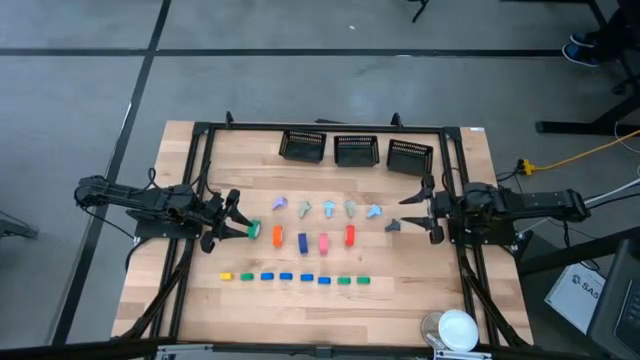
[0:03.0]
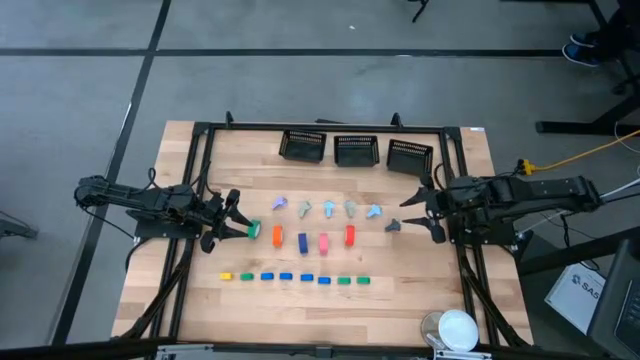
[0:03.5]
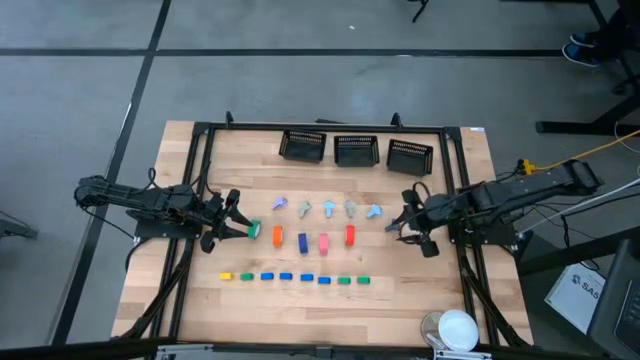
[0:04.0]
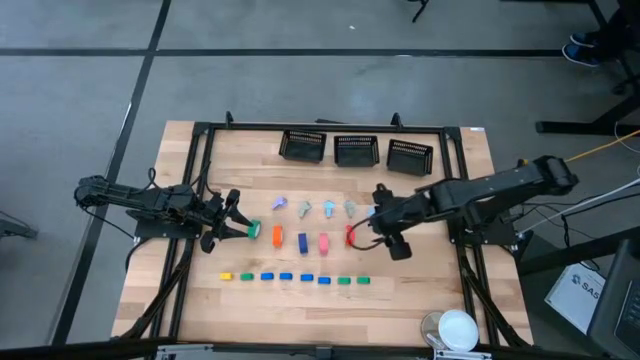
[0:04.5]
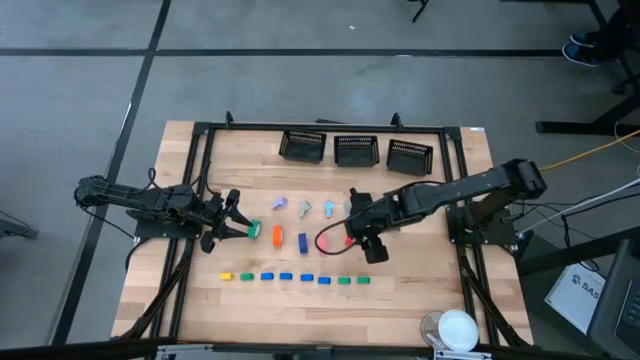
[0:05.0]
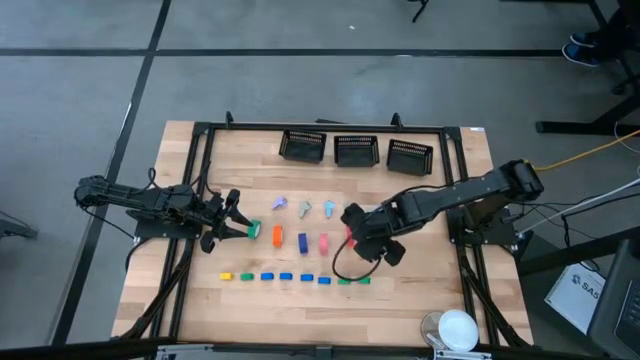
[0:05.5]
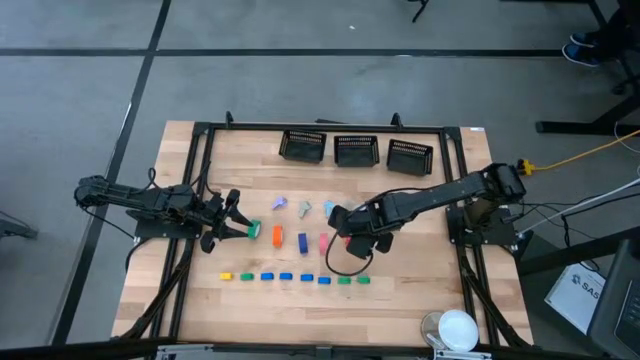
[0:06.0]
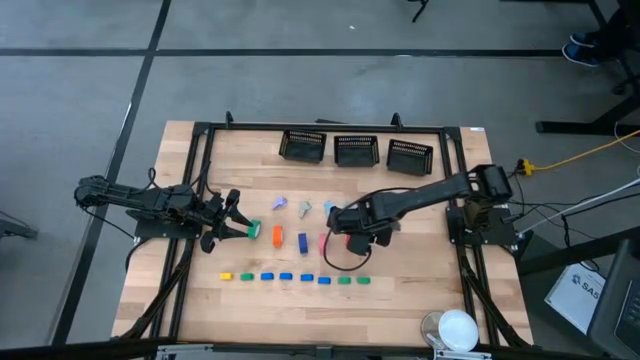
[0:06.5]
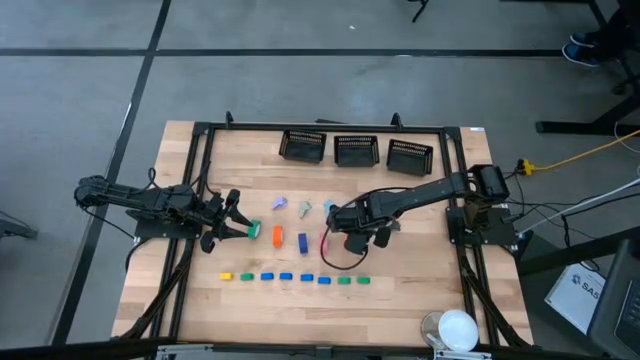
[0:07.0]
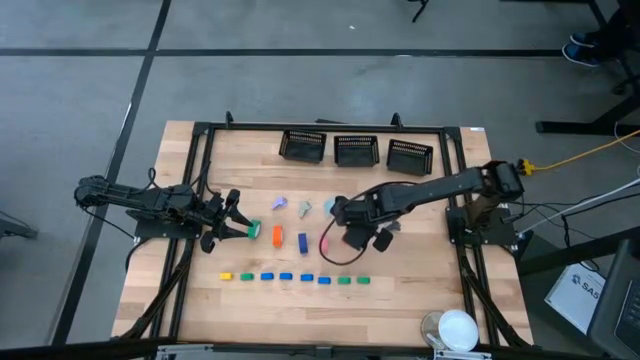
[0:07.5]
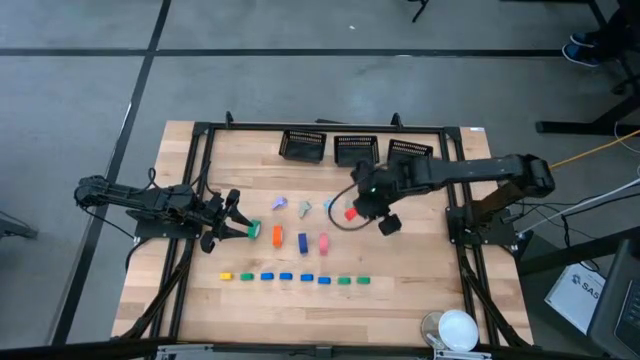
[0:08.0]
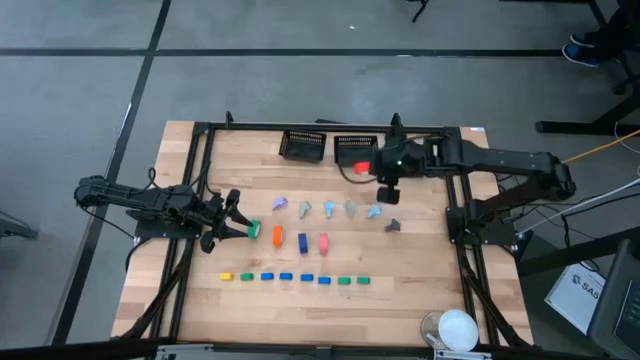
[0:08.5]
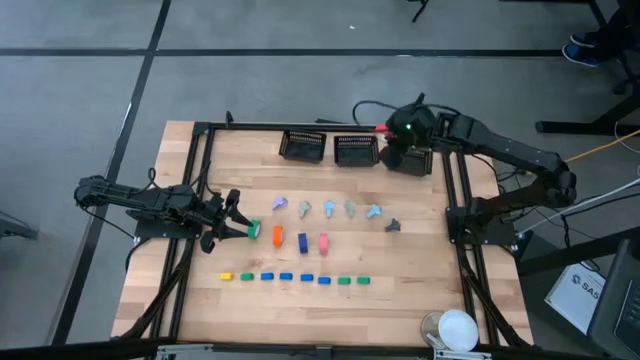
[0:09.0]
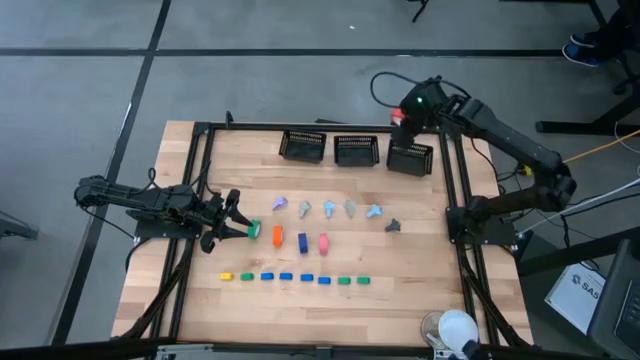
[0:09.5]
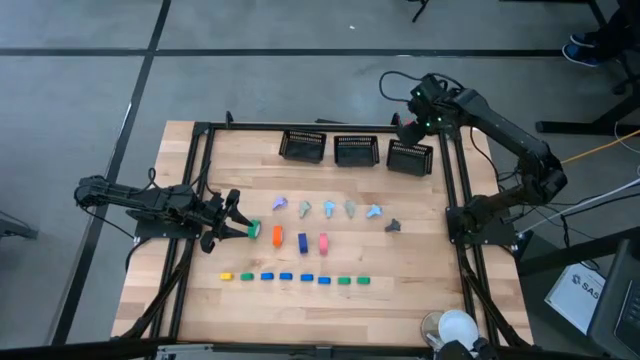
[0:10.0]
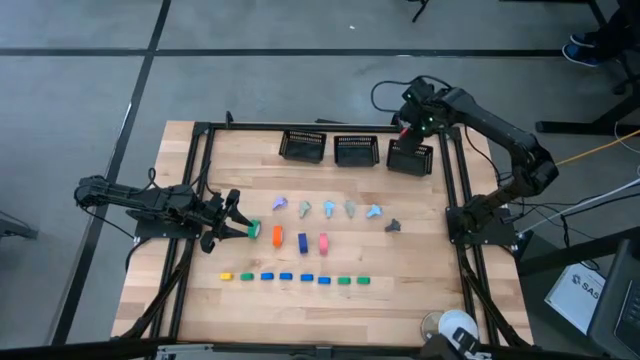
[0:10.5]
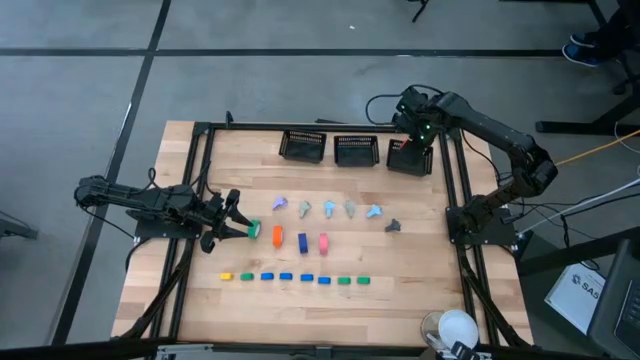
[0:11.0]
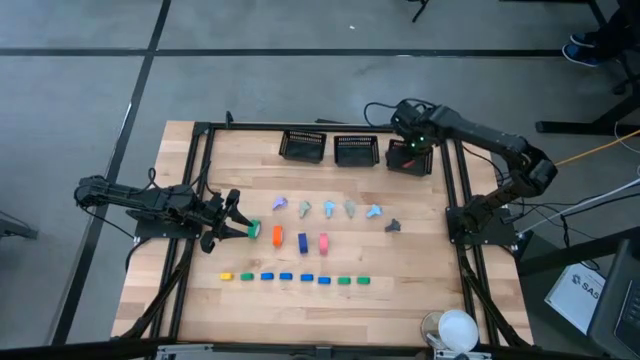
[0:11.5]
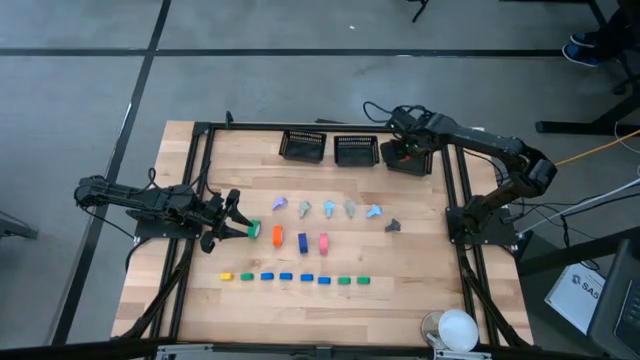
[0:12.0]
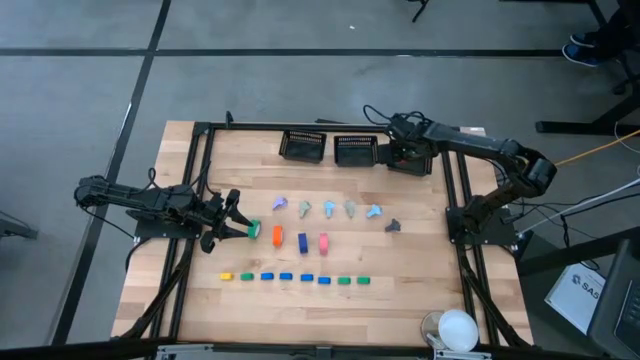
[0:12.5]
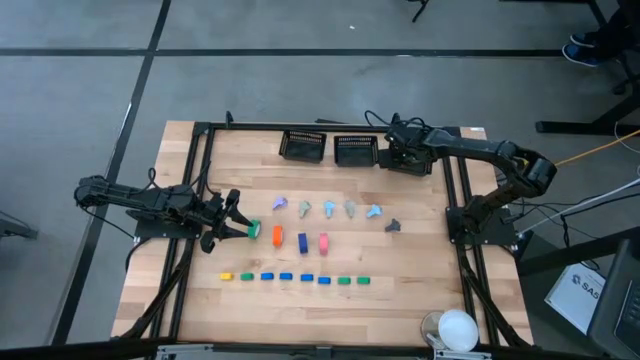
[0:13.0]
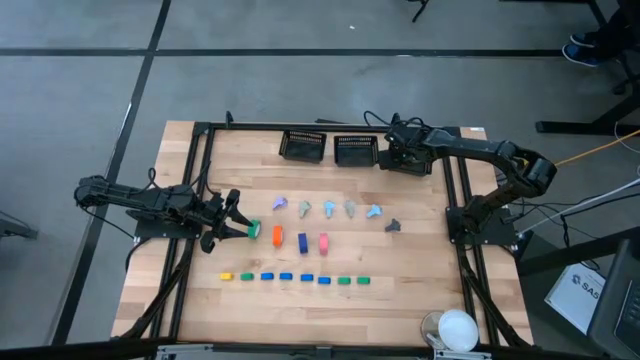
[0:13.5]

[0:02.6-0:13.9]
Task: Pick and place Stapler, Stapler remover, tape
Put the red tape into the right black bin

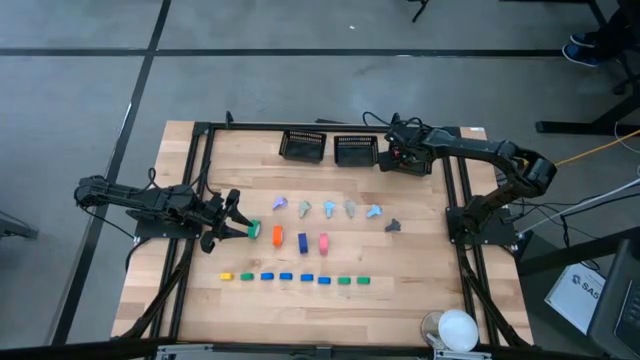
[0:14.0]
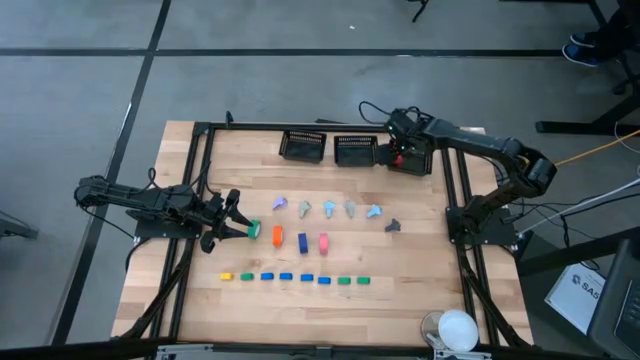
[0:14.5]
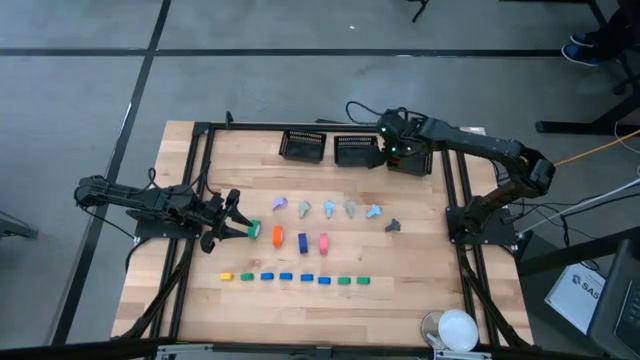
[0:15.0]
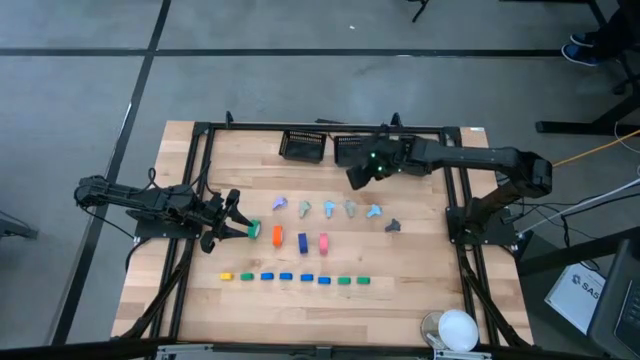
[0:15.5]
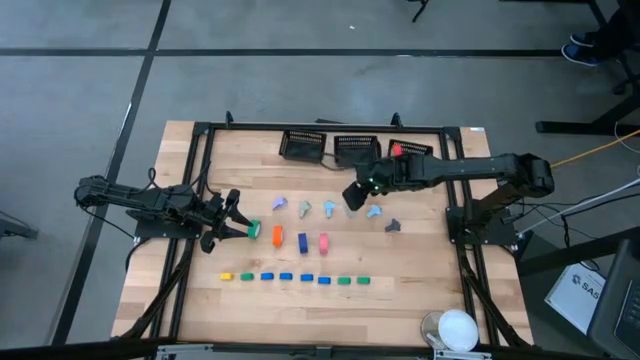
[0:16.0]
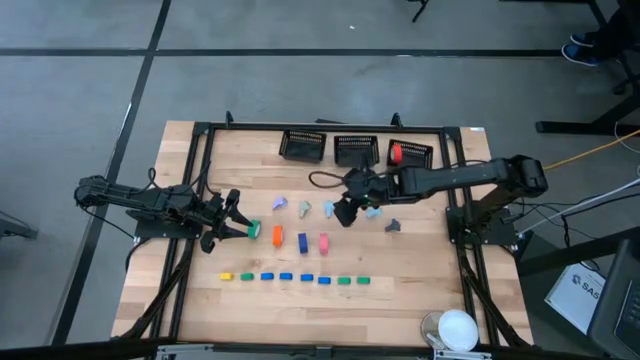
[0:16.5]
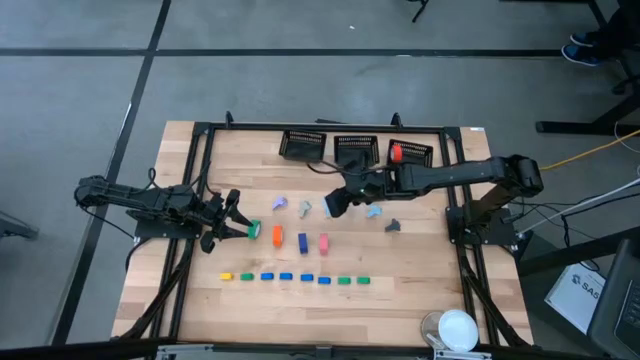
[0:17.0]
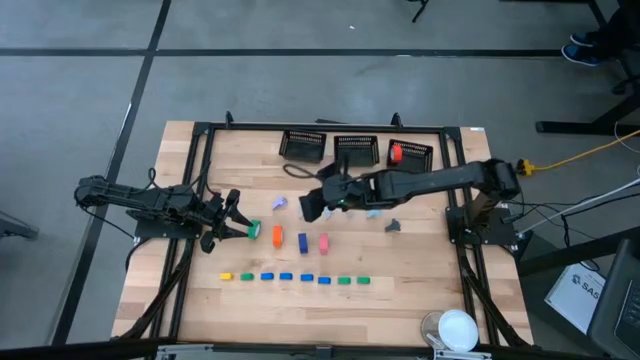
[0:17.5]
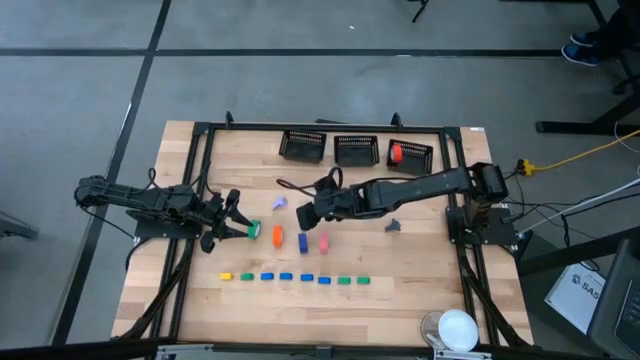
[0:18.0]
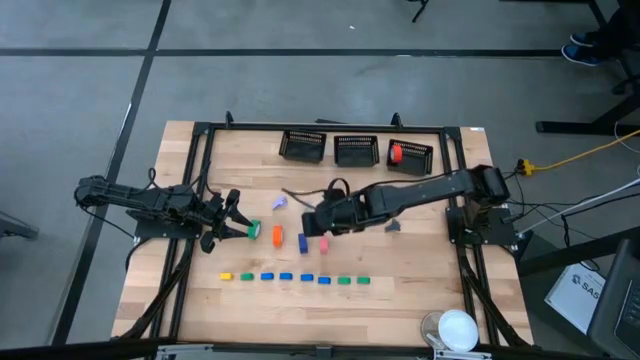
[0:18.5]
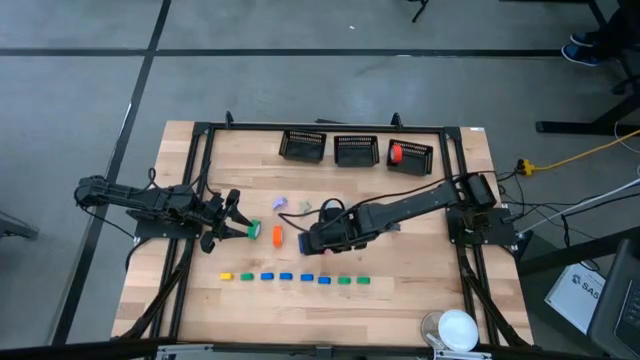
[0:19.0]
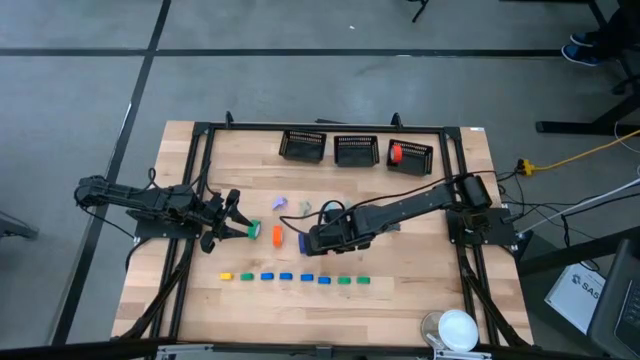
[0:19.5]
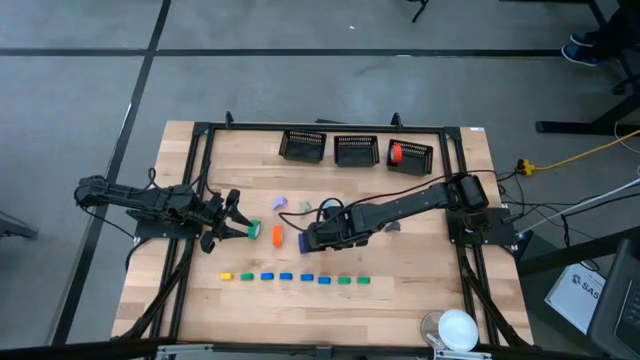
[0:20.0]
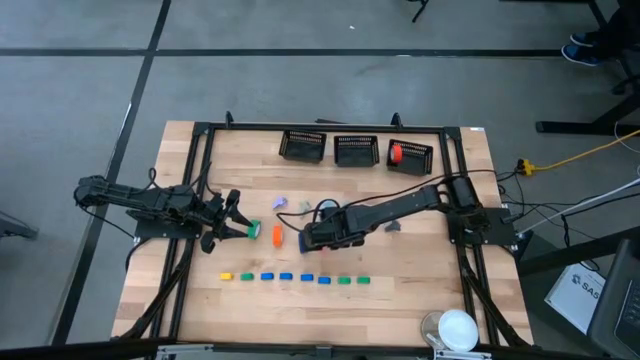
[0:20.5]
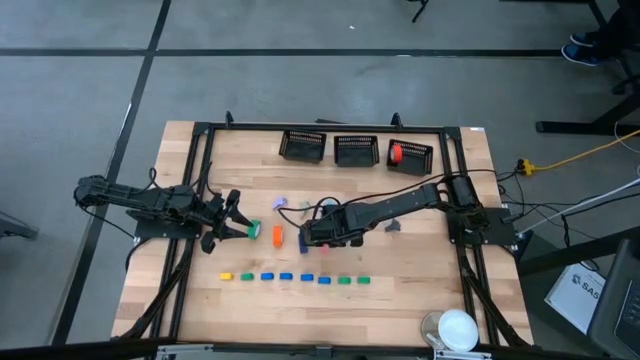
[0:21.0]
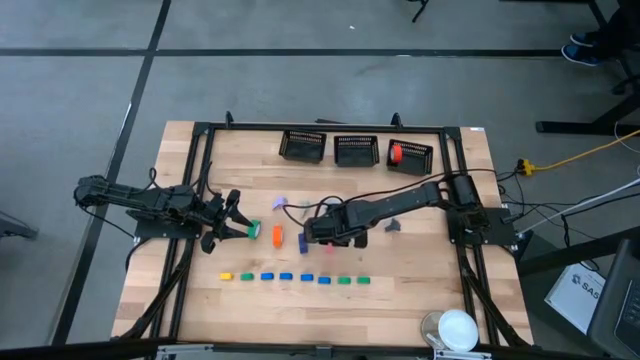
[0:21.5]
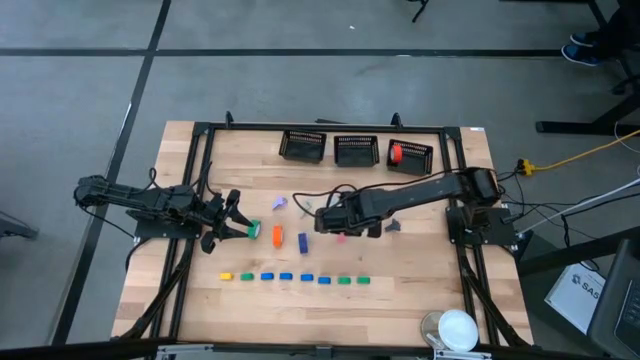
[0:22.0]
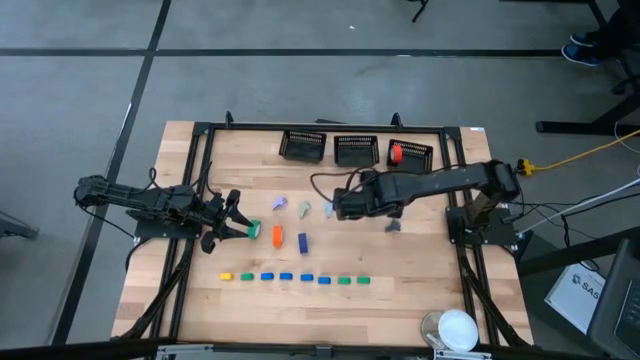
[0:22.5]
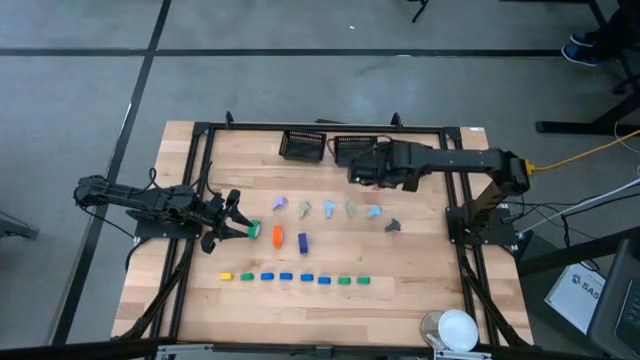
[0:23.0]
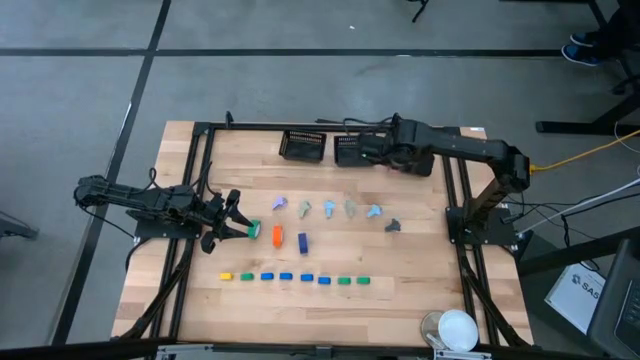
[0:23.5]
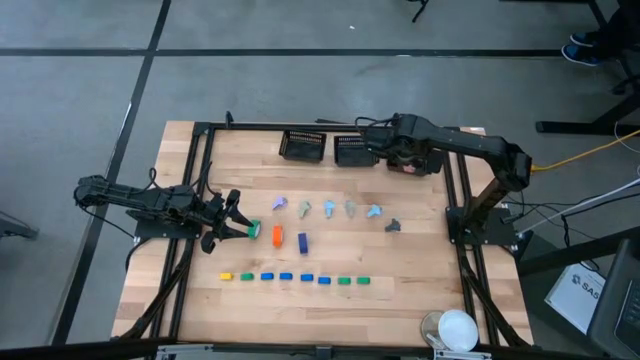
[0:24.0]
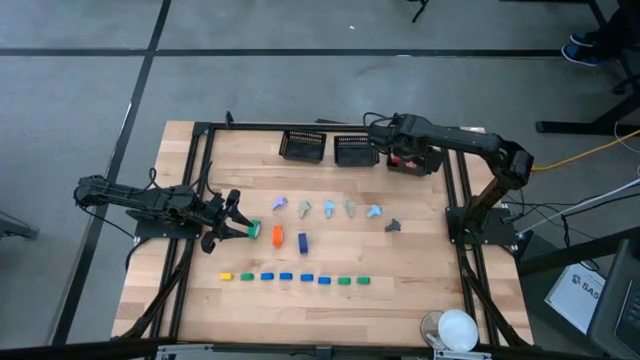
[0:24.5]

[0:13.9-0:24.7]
Put the pink tape into the right black bin
